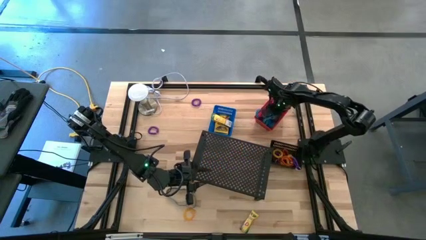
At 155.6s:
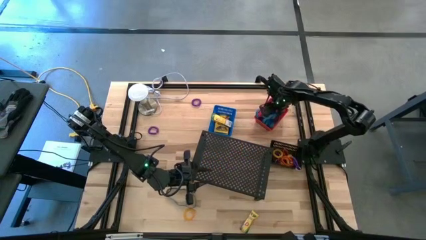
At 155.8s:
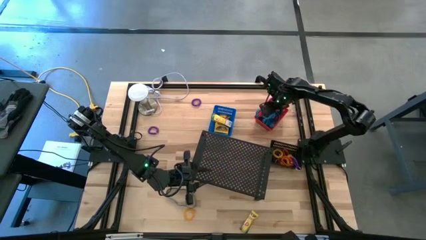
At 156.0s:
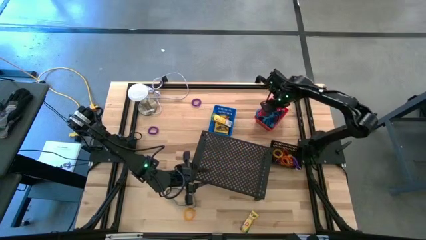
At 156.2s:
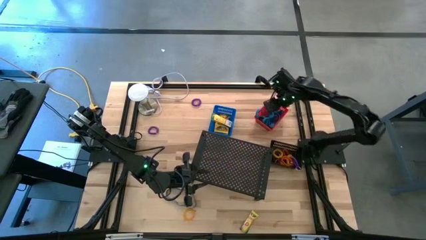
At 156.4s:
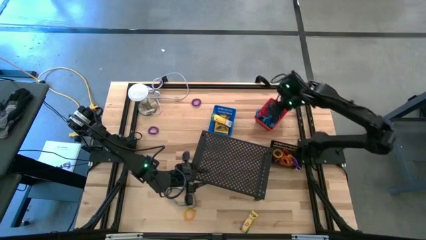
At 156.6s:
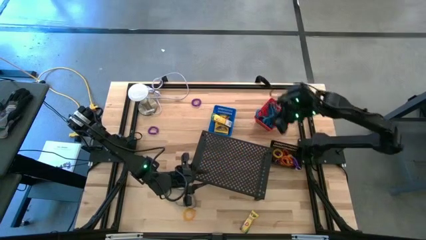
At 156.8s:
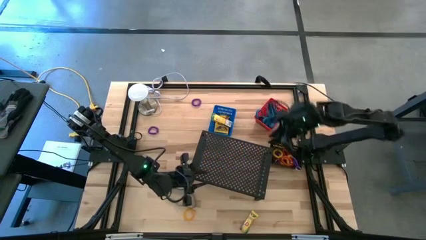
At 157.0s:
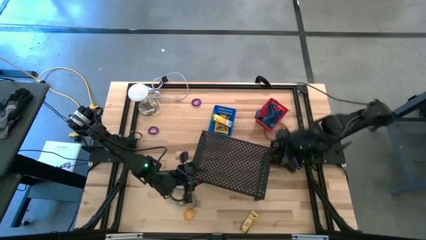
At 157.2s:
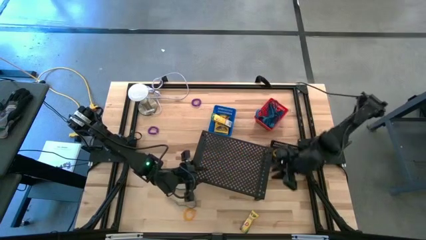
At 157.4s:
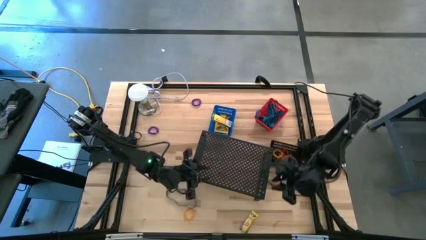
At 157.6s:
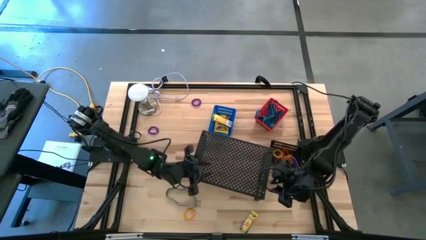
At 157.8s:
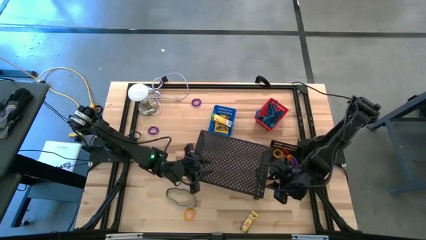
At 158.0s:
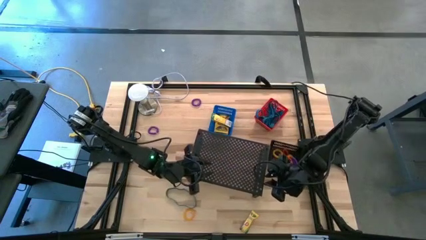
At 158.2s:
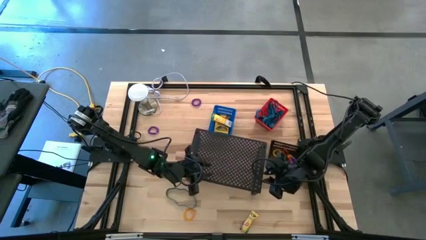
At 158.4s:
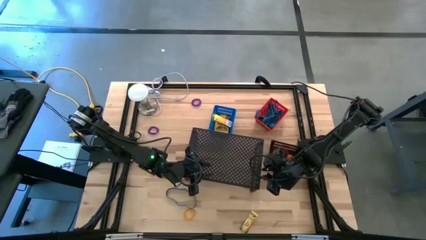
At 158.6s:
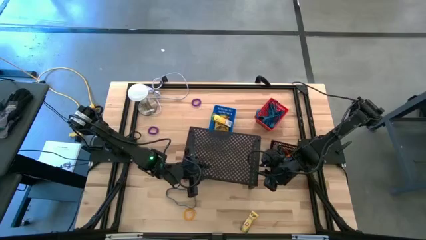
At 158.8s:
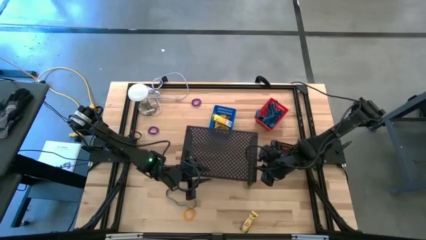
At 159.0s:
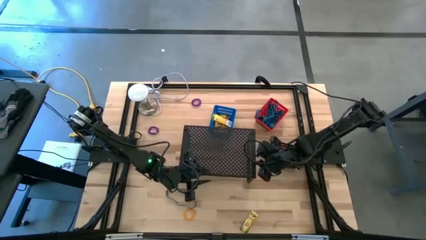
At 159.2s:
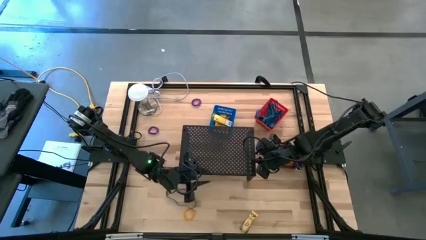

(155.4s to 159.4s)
Task: Pick & Place Office Desk Supplies
Move the black shelf to the center of the table

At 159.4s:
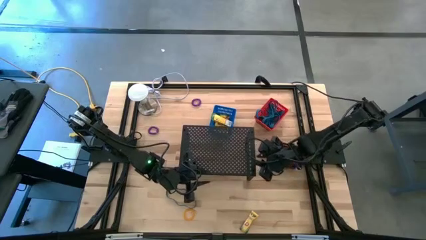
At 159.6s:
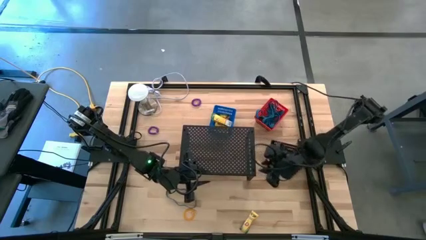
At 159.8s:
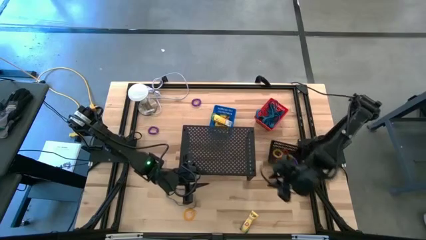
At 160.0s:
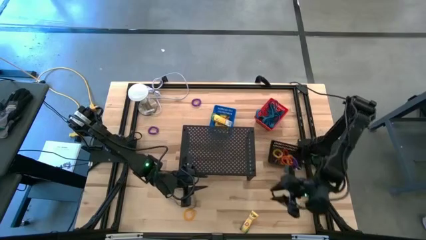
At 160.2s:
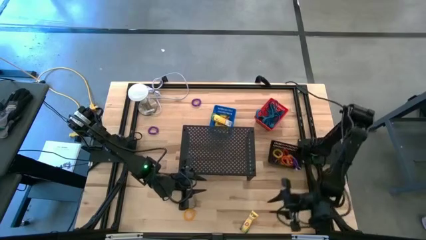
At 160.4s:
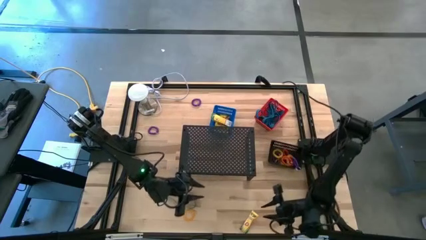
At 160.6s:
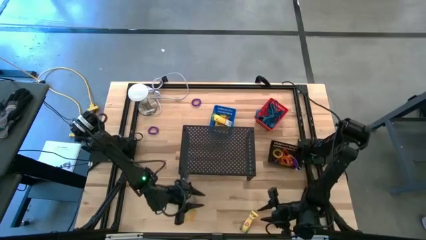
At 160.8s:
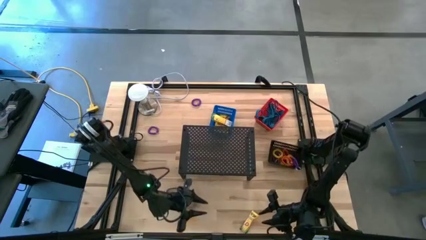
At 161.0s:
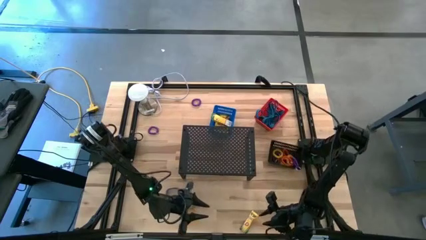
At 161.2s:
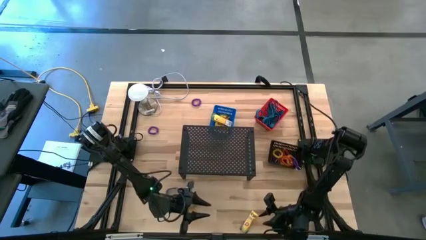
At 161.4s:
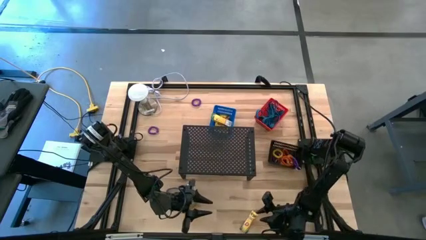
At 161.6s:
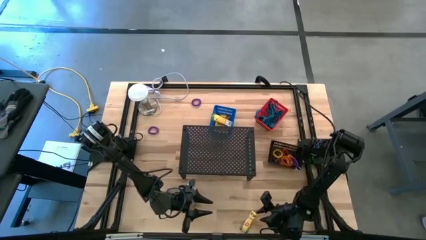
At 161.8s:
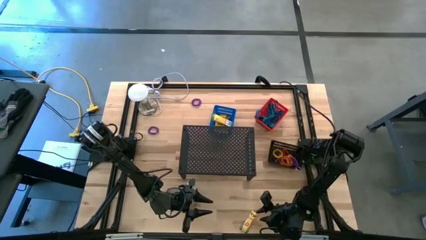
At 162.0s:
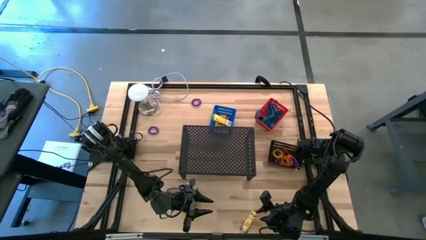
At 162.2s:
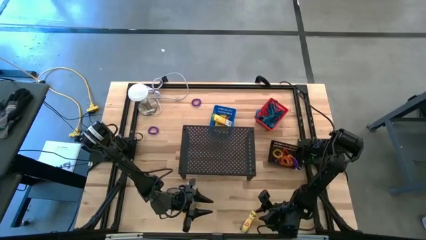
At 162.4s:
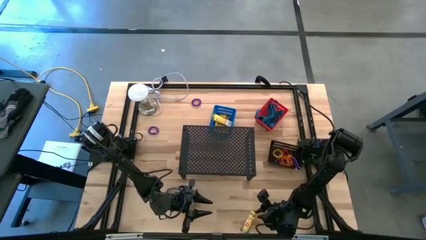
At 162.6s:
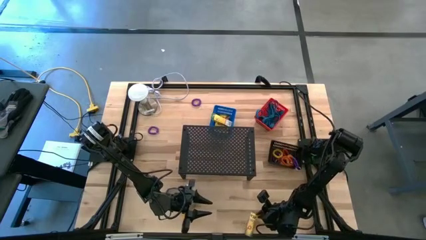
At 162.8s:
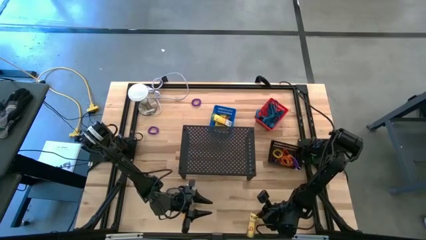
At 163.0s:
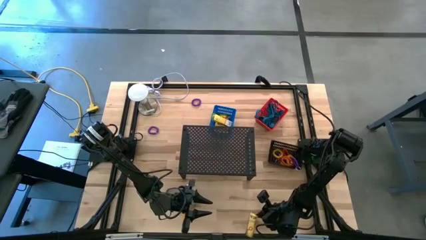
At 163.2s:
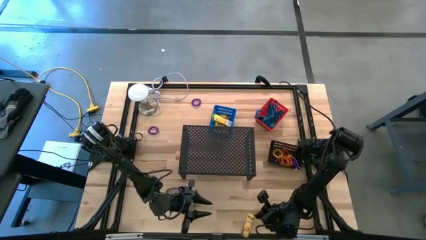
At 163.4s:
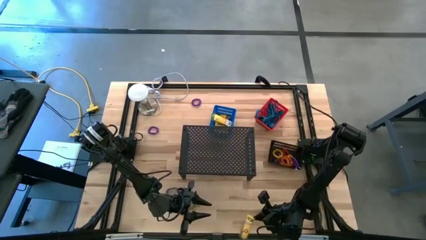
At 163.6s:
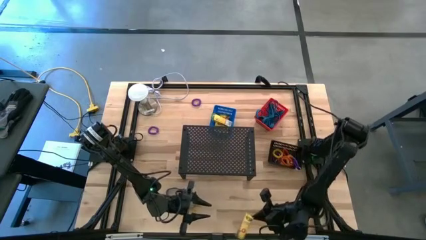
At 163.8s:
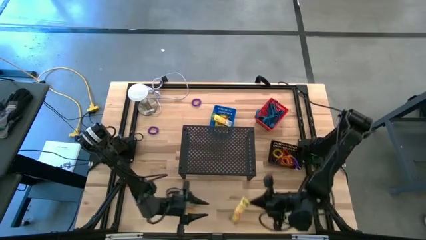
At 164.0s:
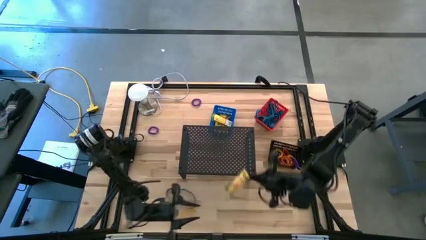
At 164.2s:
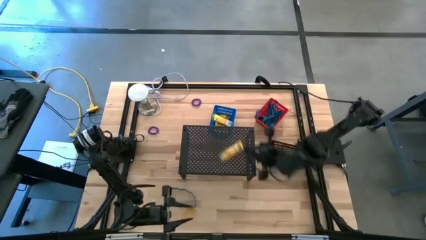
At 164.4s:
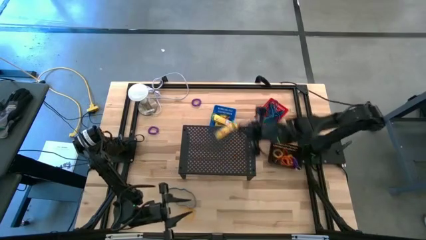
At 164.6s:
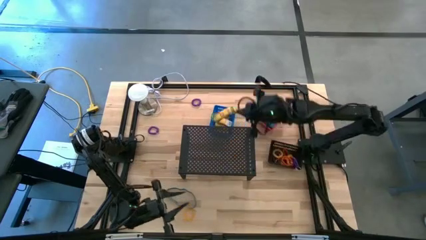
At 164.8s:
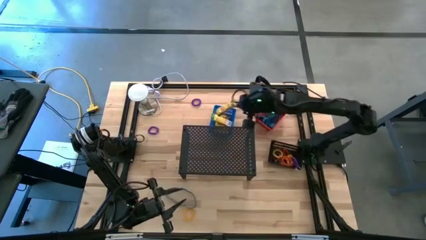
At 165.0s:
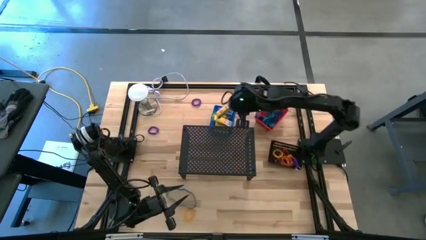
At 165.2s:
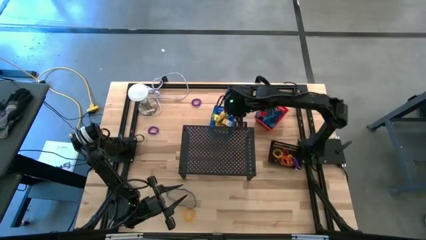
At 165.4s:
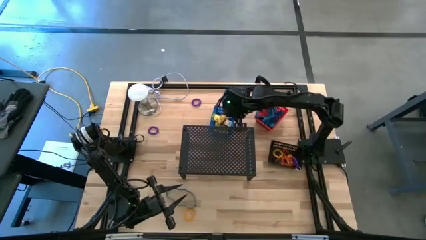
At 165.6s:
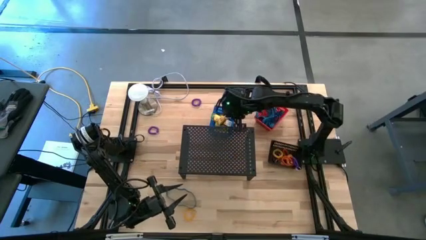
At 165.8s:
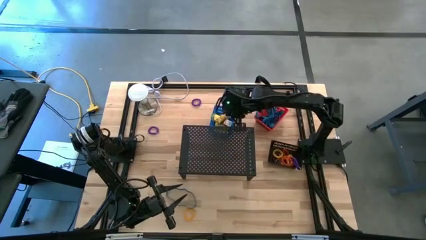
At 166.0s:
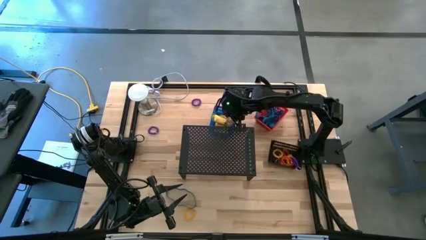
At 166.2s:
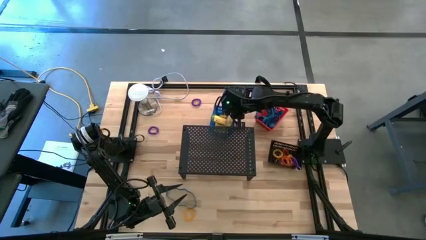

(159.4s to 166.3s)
Put the yellow crayon box into the blue bin

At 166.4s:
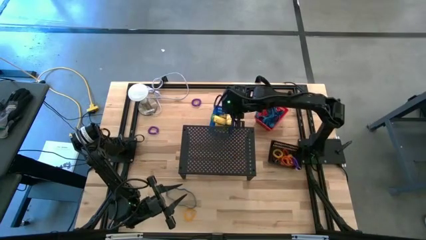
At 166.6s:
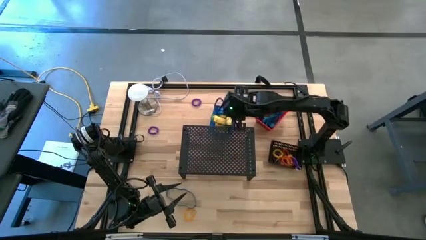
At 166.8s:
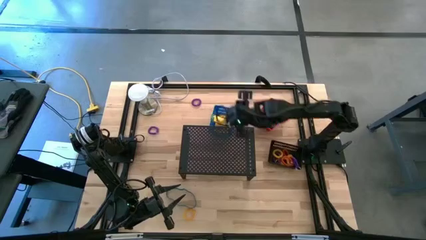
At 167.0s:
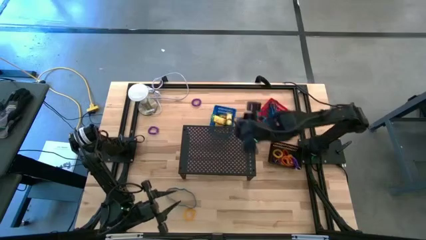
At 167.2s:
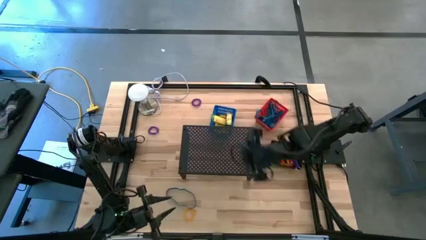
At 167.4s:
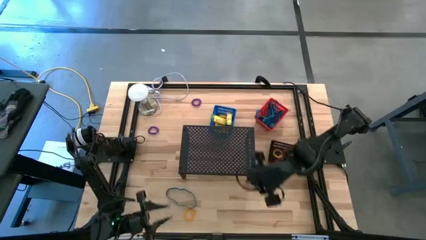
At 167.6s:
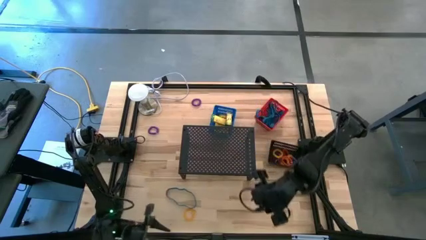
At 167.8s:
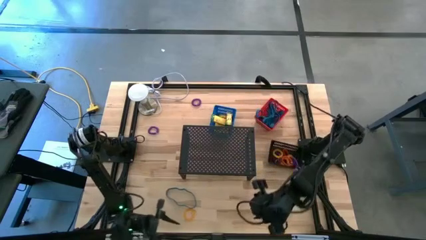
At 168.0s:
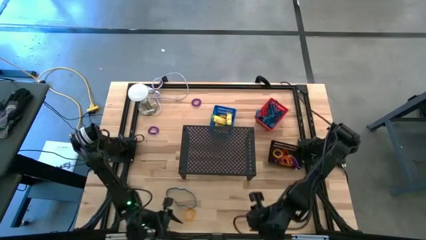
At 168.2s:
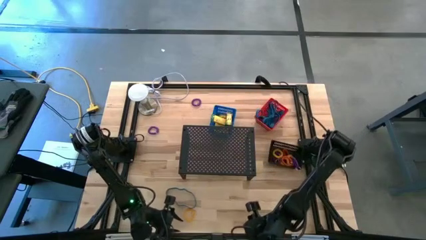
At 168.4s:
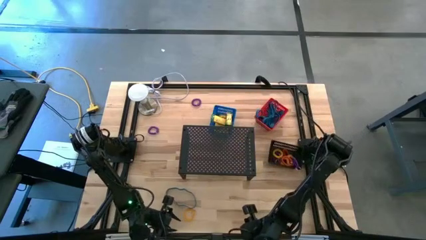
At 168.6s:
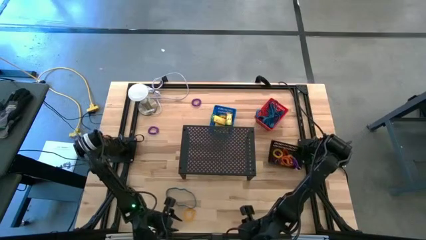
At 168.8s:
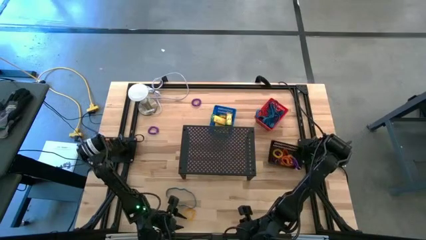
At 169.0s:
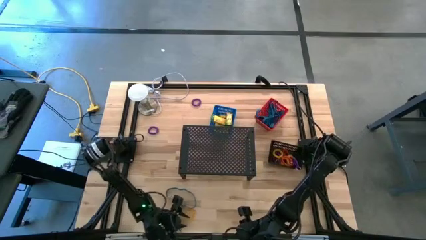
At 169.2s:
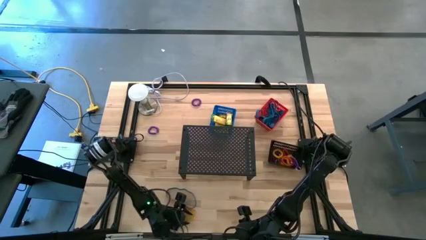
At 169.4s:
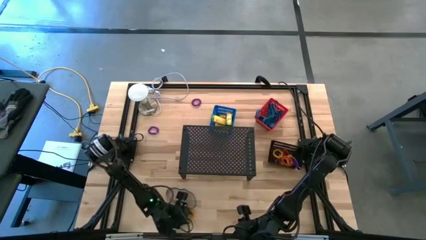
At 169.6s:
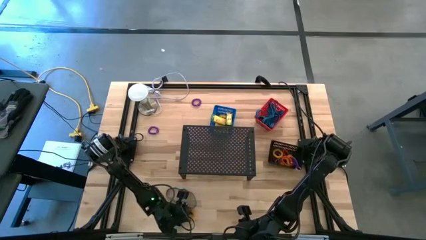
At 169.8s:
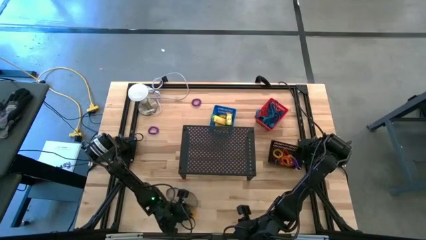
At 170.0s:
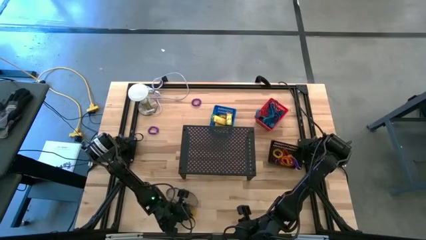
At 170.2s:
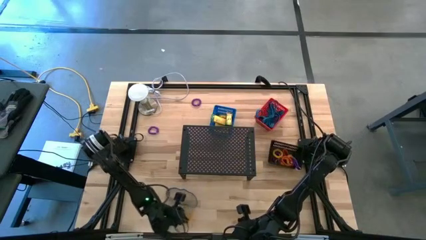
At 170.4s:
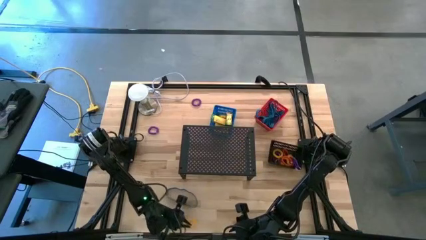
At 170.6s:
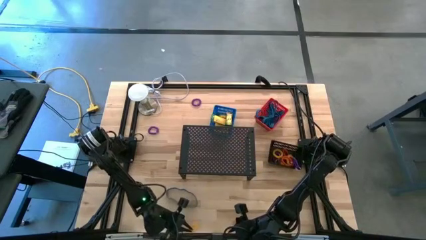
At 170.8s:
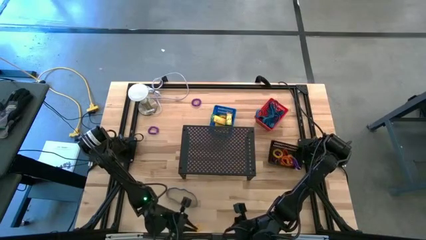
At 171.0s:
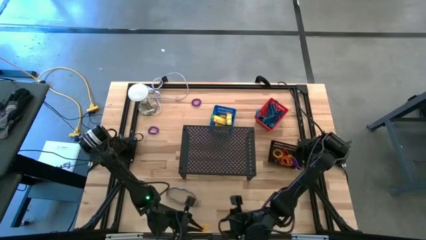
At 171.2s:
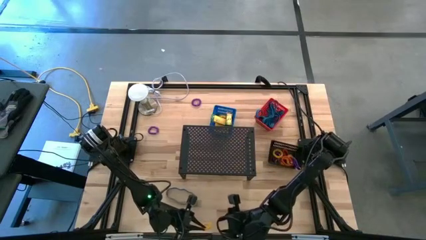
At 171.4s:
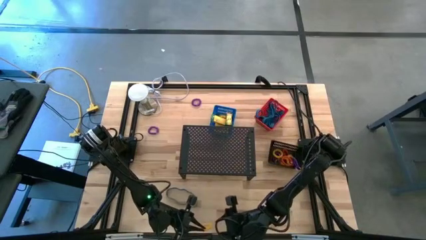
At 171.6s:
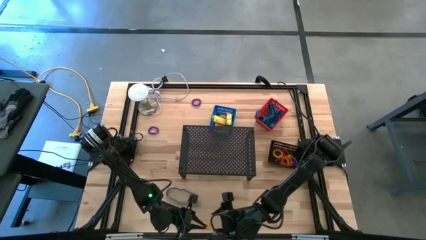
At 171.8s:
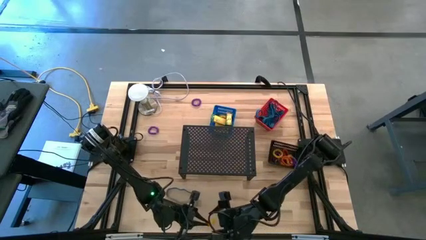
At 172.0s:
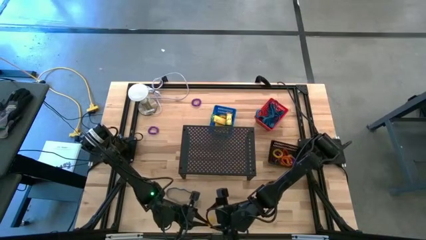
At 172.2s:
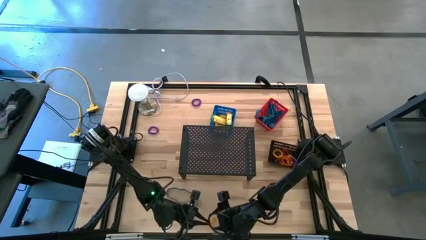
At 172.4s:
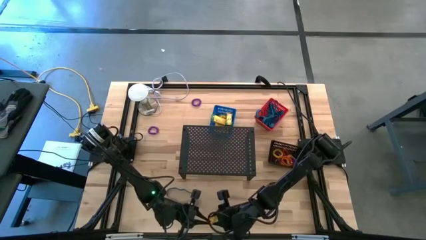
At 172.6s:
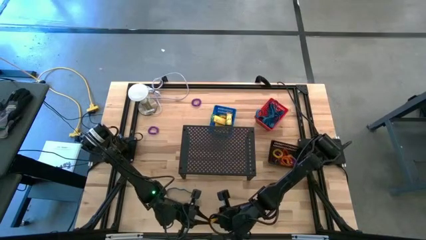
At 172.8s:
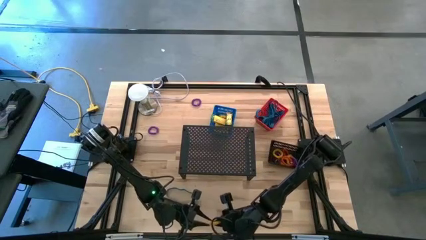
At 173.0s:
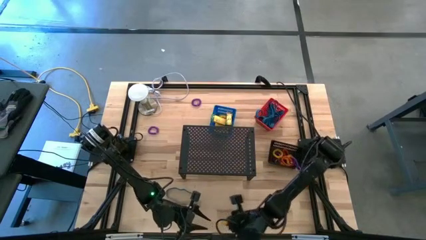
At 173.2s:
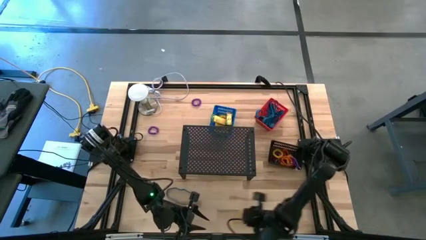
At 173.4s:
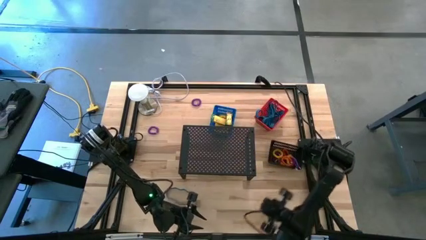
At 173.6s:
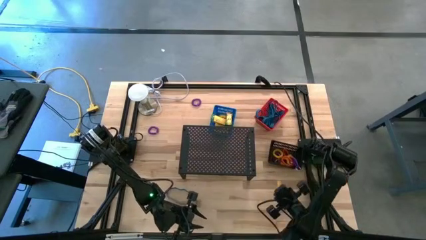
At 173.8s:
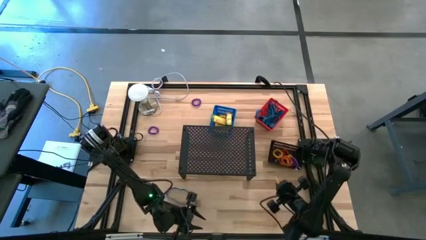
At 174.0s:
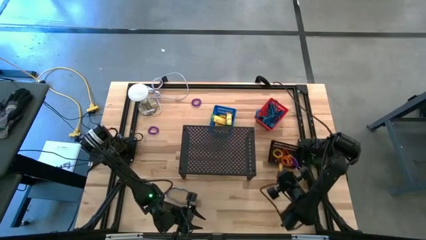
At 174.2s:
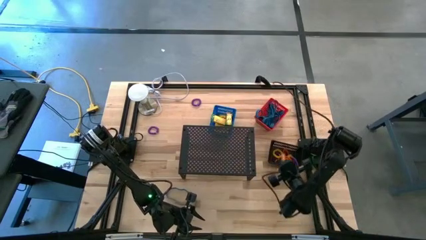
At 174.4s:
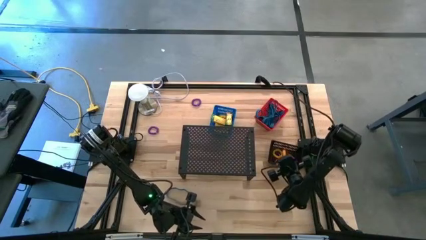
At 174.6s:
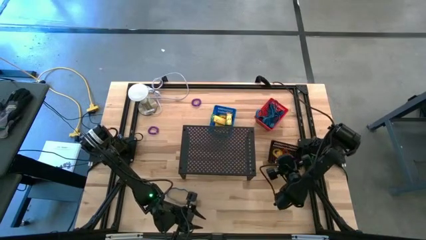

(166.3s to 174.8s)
Put the yellow spiral keychain into the black bin
